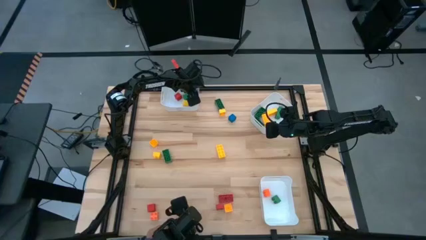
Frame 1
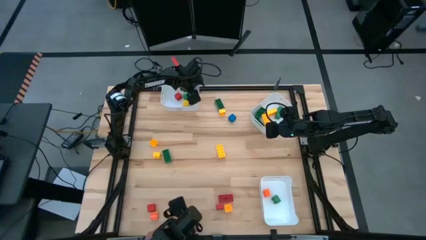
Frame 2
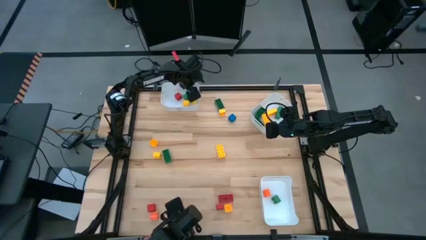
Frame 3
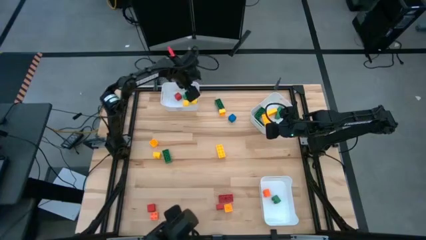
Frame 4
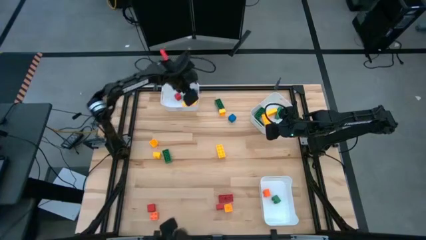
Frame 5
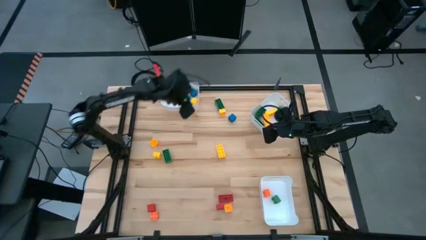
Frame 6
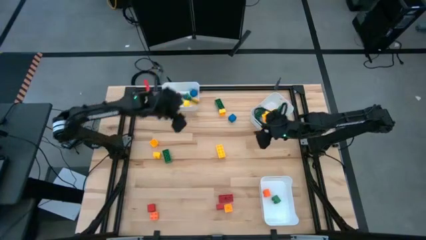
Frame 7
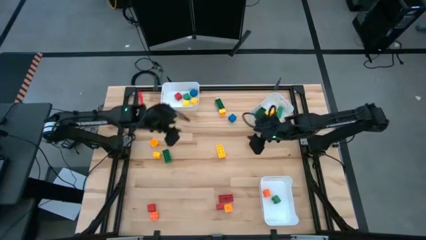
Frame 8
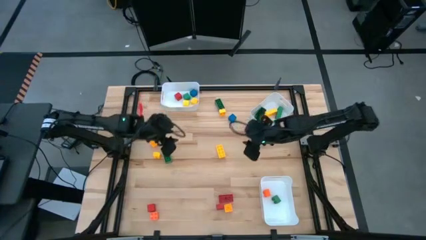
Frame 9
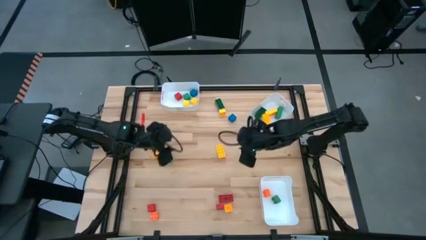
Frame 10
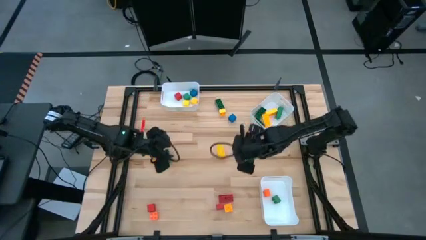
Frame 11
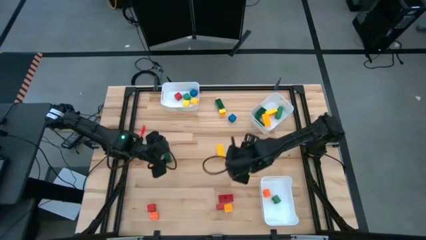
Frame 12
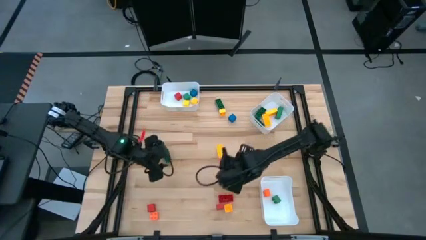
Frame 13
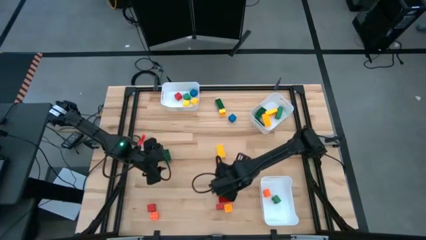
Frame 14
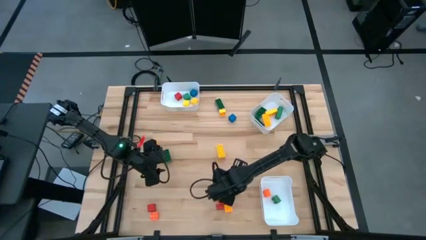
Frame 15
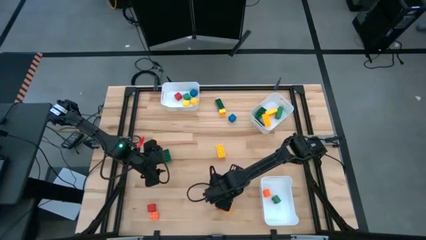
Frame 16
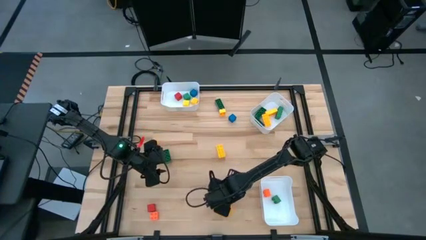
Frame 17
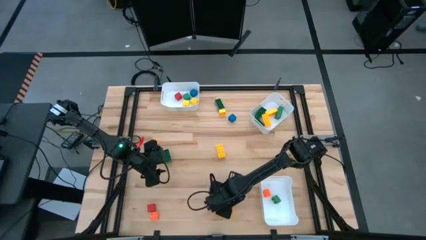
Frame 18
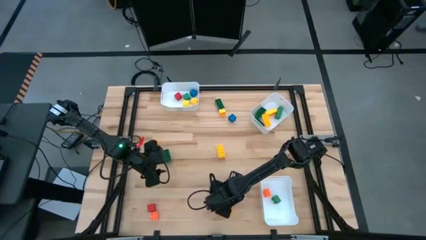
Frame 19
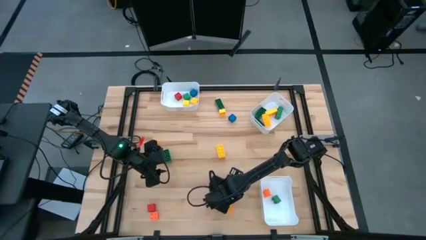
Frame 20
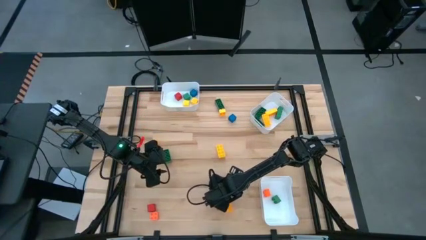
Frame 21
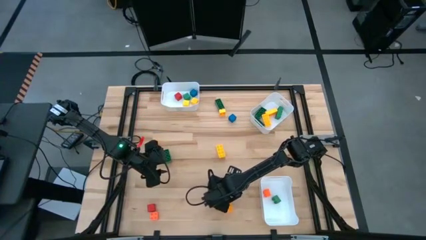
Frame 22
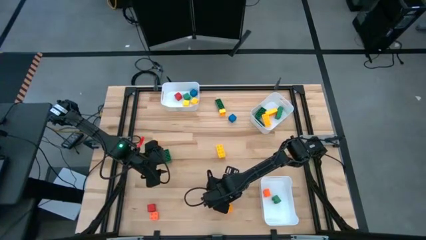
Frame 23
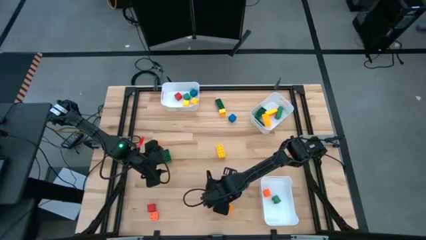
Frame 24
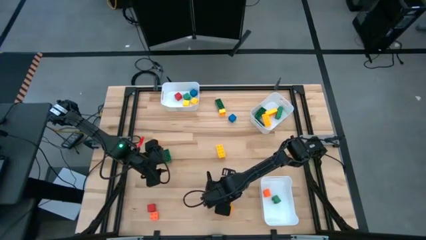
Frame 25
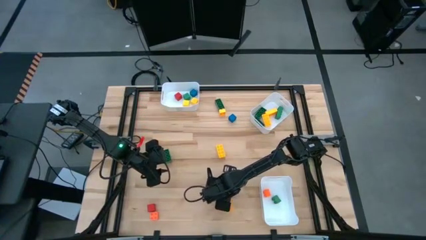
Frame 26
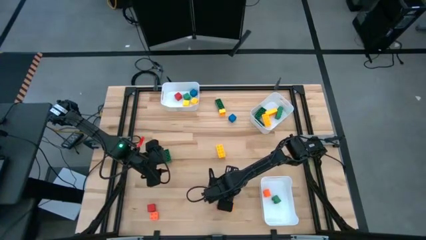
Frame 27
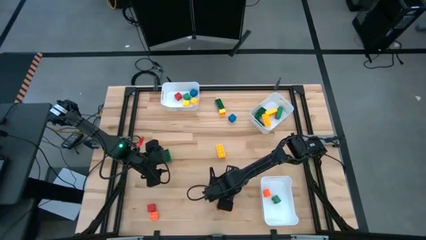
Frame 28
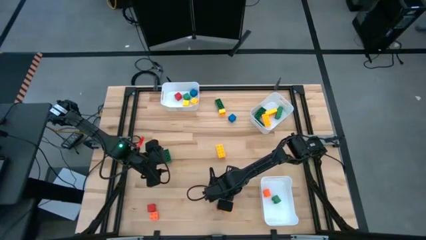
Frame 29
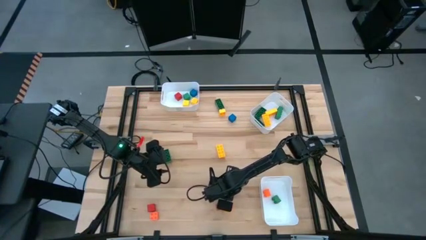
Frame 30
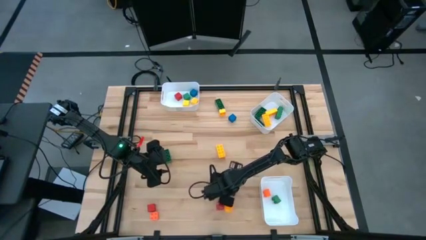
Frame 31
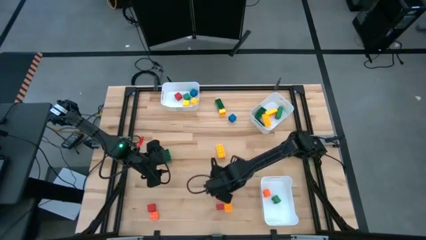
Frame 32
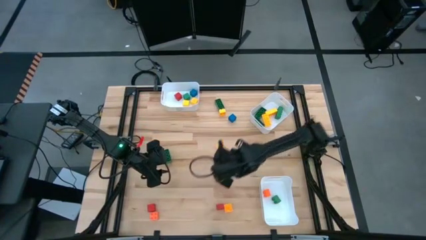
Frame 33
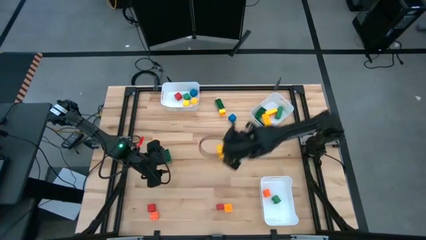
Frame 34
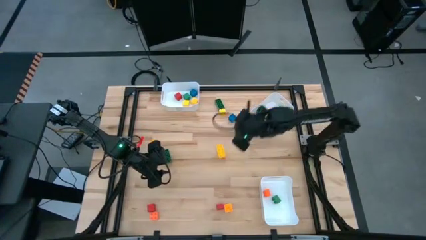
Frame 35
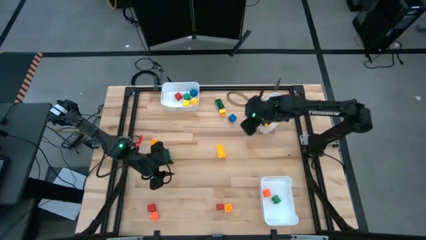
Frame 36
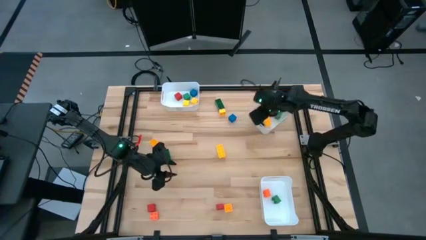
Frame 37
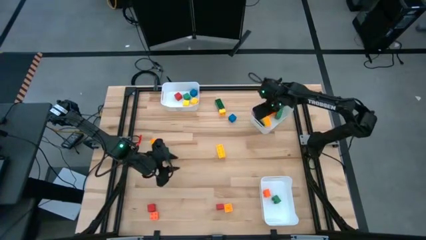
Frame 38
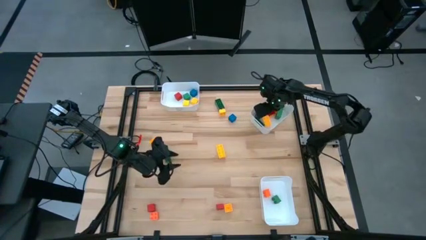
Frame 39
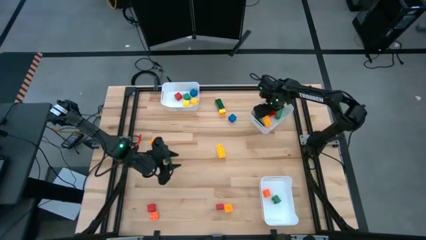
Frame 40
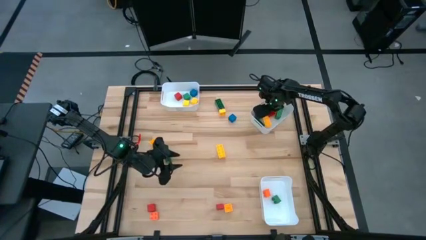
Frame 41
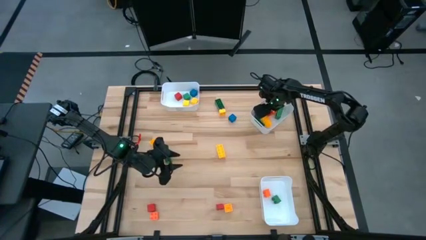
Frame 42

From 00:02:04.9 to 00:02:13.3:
Task: Sort blocks by size
Put the red 8 stud gamepiece into the top right white bin

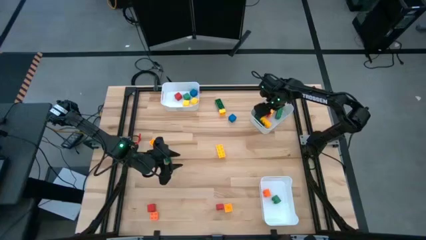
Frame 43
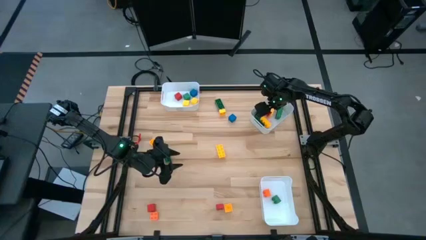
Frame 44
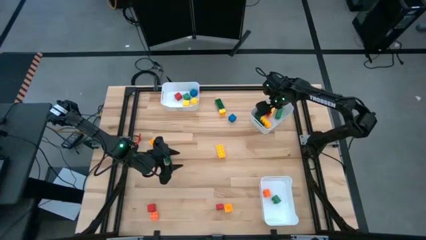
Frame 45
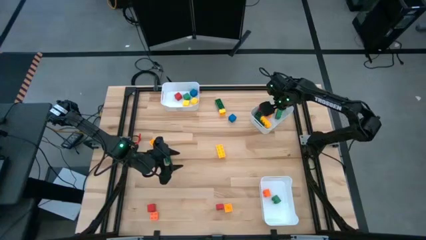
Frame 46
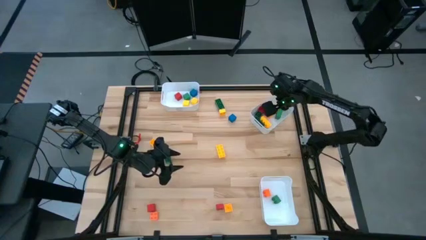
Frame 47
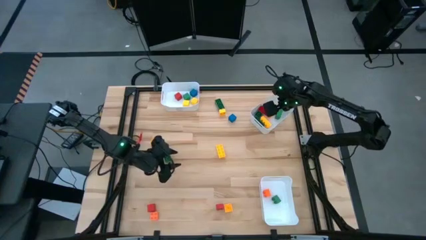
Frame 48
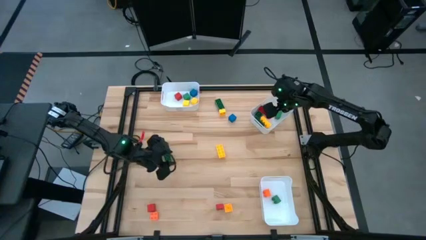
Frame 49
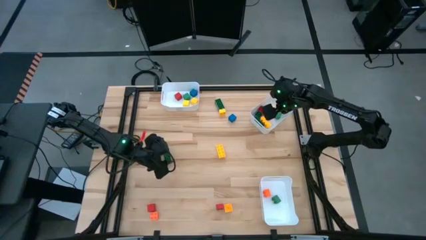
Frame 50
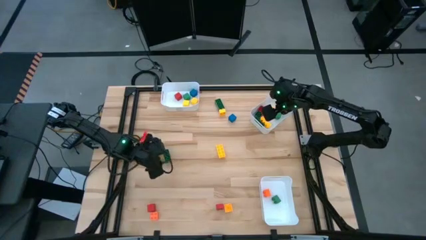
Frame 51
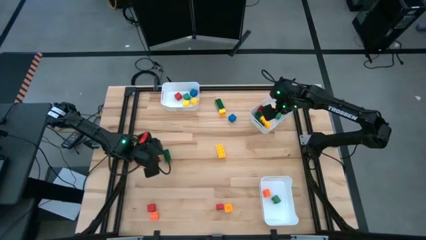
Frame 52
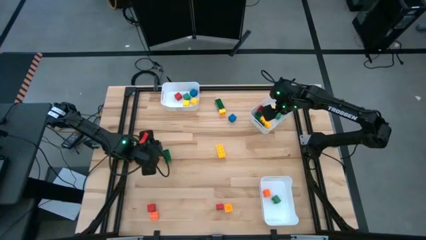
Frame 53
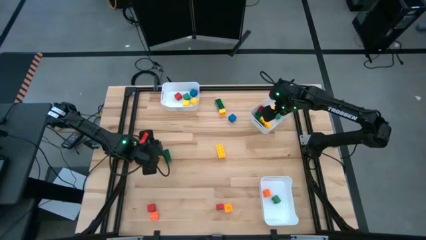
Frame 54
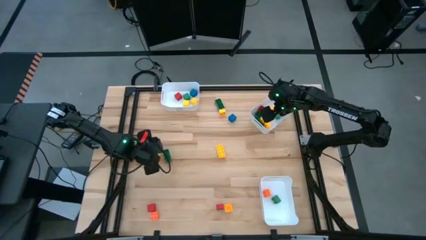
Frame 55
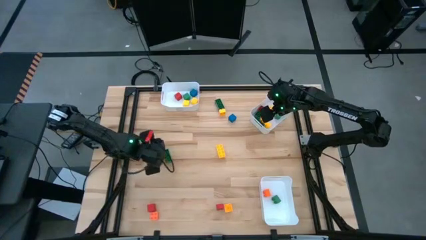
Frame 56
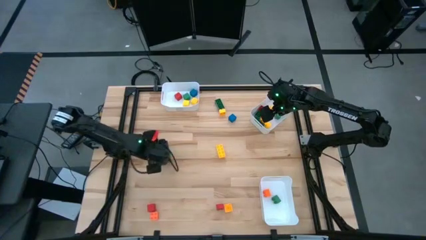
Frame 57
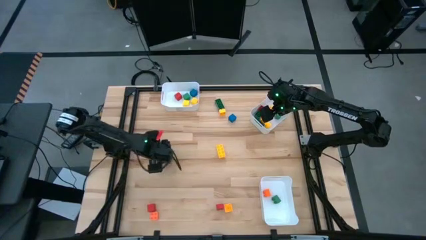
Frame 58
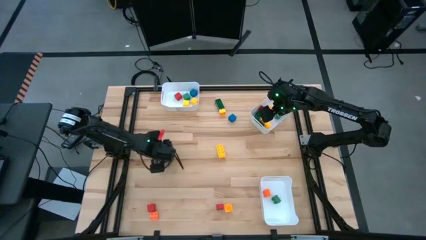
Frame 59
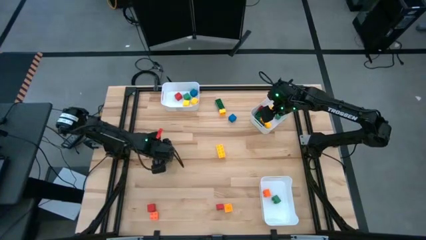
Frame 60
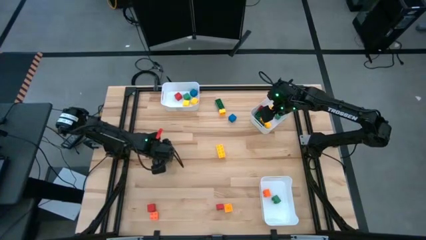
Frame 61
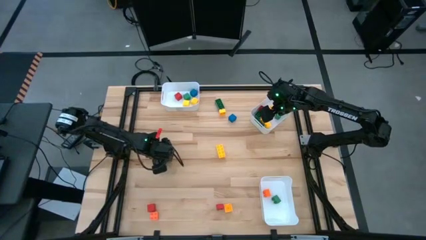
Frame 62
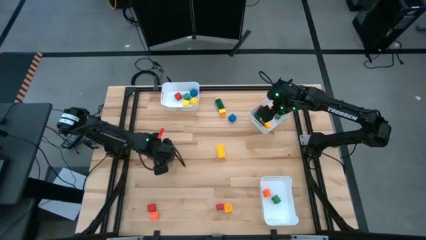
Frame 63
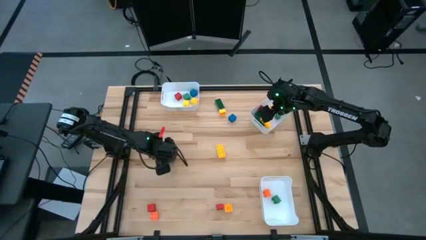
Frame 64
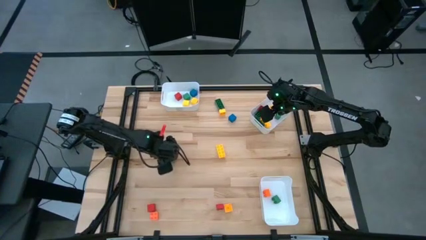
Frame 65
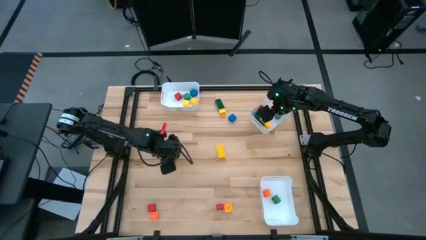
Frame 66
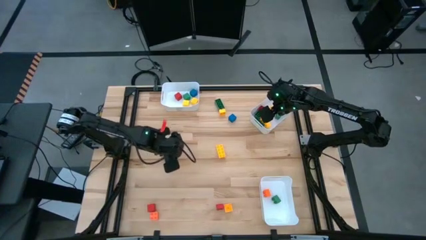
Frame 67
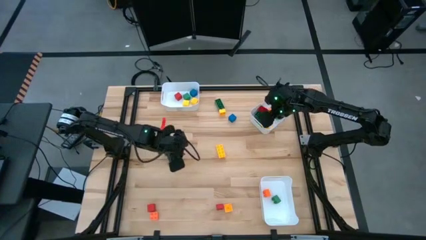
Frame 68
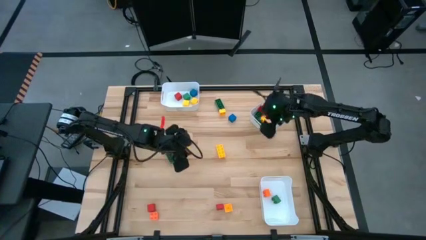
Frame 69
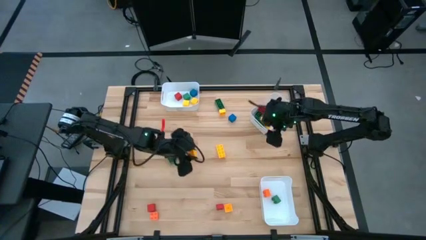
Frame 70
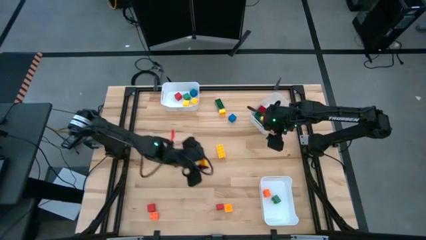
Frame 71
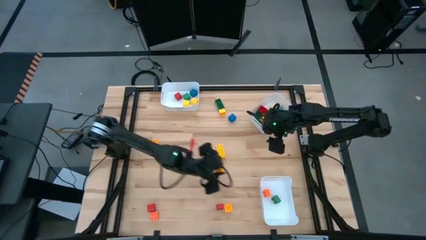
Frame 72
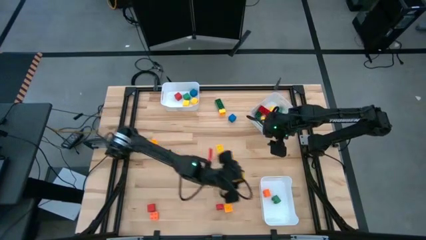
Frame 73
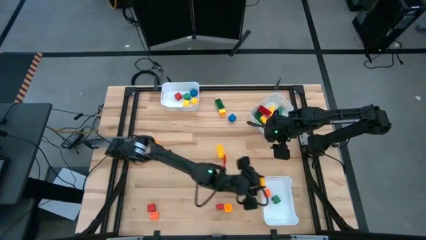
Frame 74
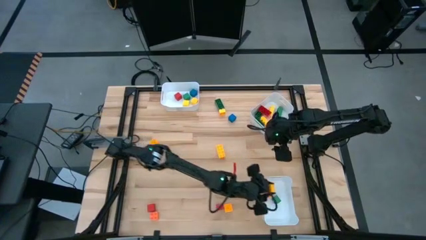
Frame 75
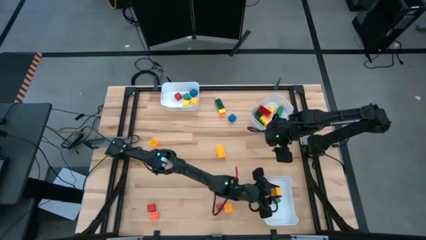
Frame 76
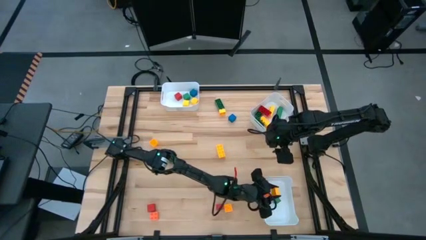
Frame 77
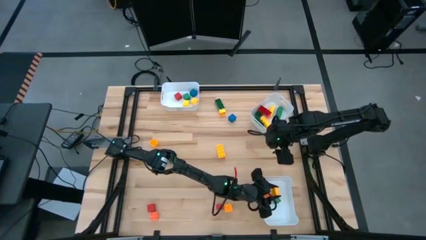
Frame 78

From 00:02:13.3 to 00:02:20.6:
Put the yellow 4 stud gamepiece into the bottom white bin
